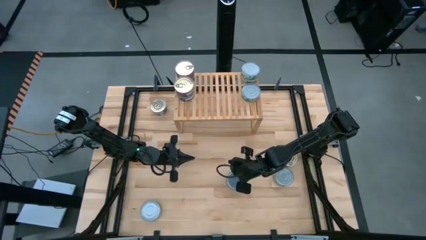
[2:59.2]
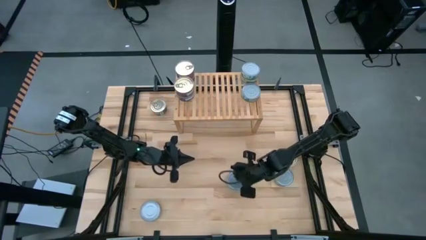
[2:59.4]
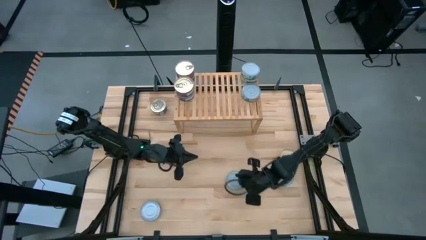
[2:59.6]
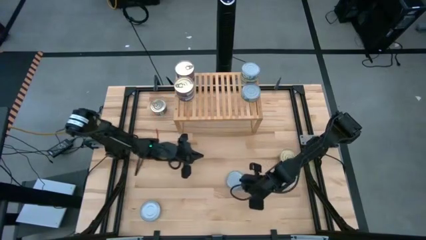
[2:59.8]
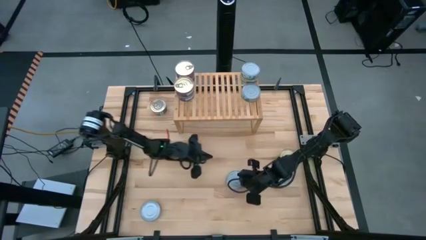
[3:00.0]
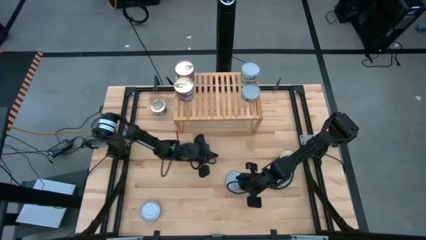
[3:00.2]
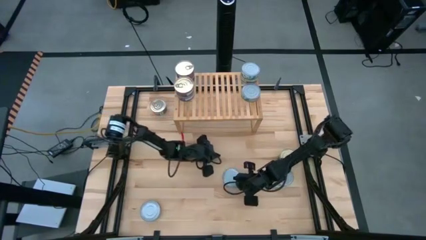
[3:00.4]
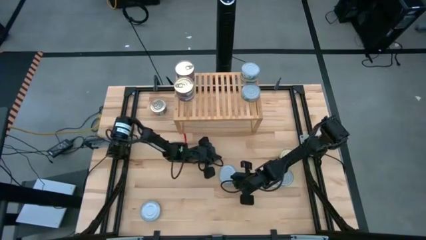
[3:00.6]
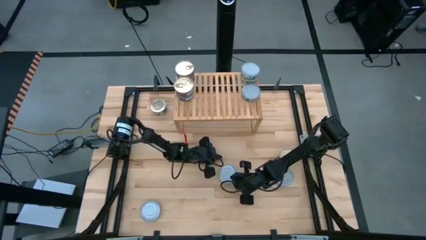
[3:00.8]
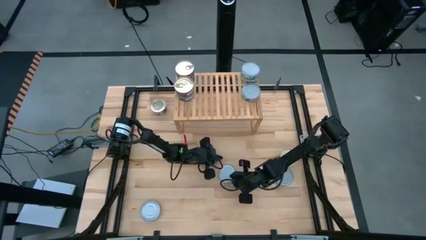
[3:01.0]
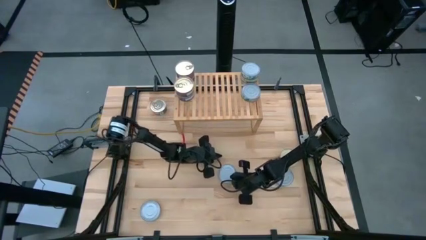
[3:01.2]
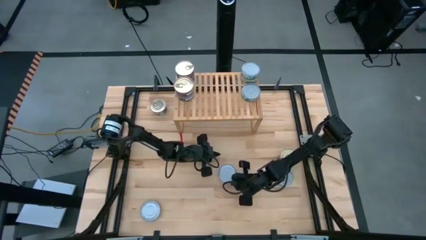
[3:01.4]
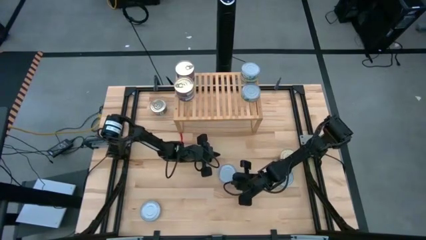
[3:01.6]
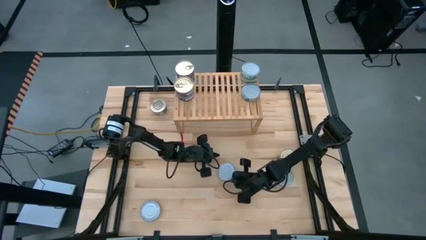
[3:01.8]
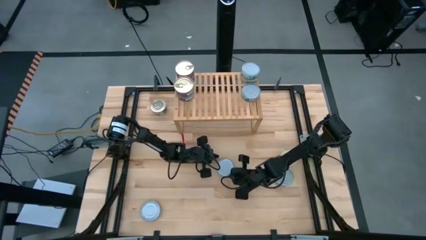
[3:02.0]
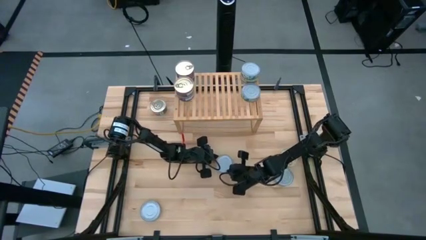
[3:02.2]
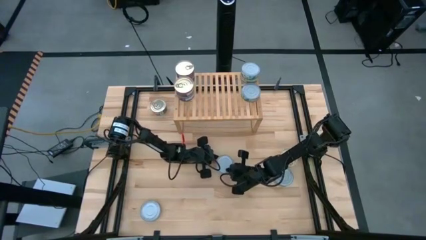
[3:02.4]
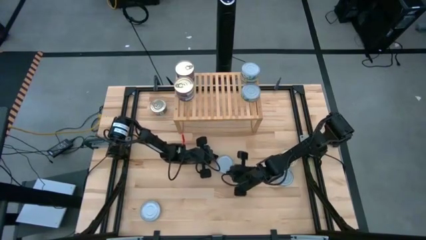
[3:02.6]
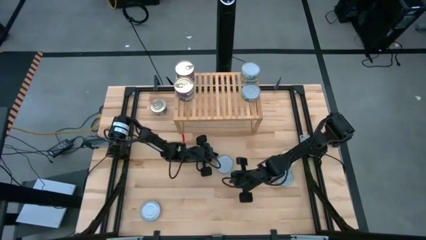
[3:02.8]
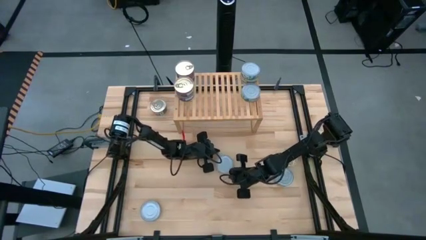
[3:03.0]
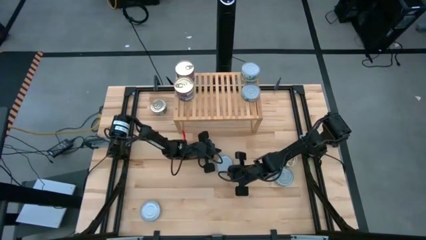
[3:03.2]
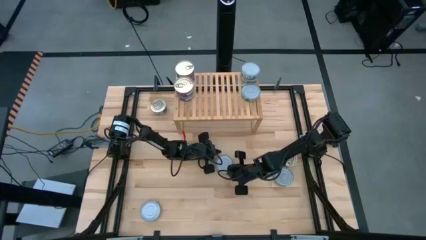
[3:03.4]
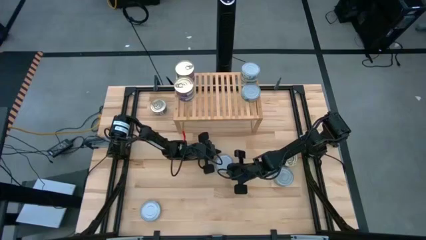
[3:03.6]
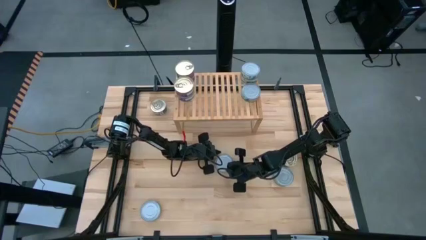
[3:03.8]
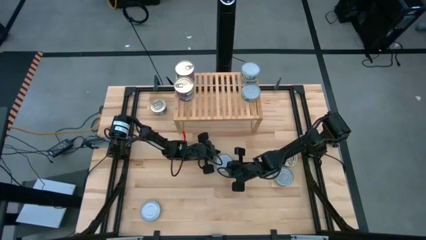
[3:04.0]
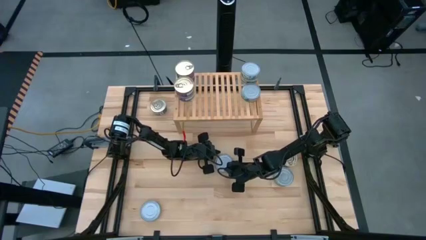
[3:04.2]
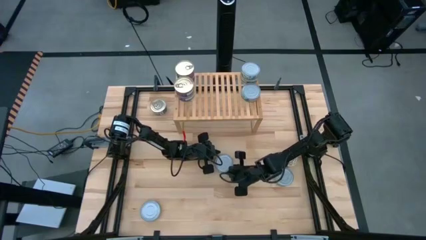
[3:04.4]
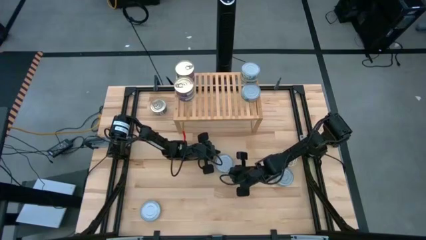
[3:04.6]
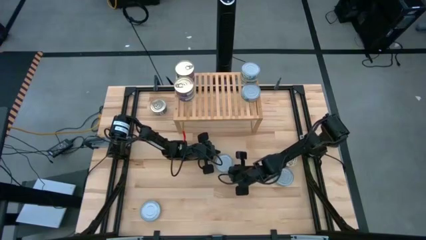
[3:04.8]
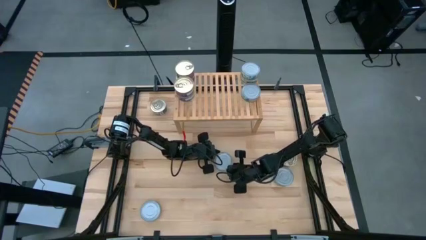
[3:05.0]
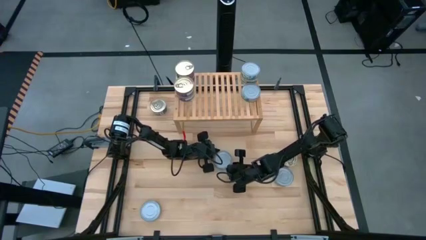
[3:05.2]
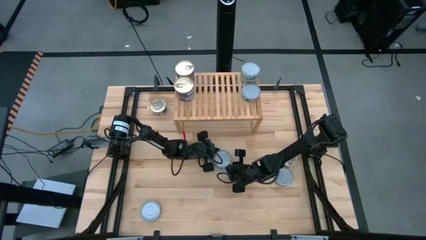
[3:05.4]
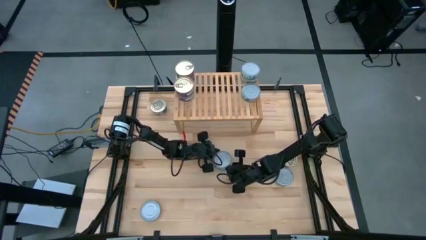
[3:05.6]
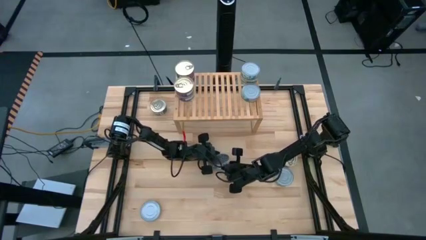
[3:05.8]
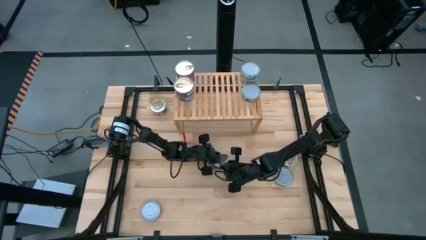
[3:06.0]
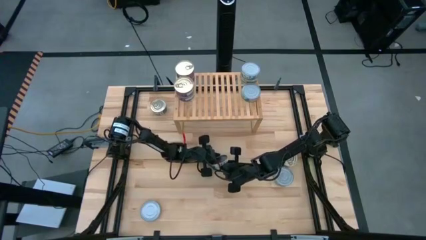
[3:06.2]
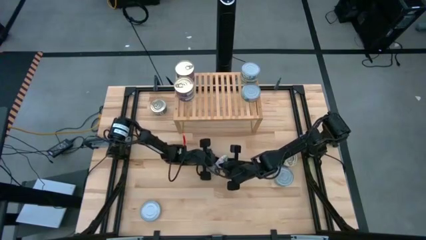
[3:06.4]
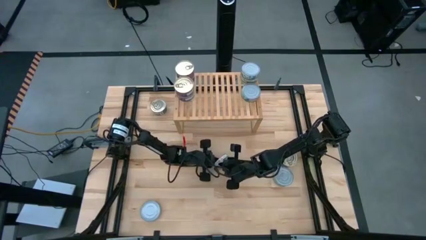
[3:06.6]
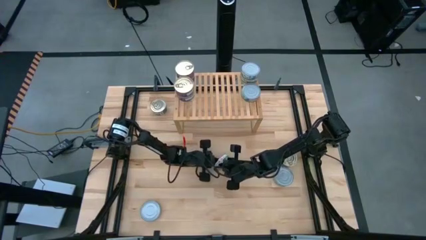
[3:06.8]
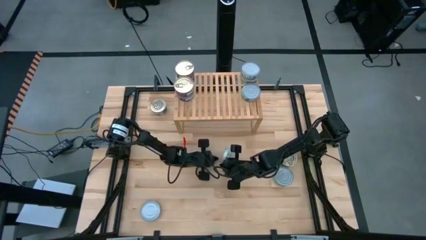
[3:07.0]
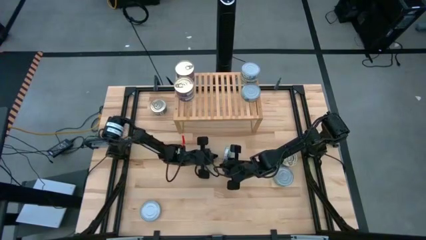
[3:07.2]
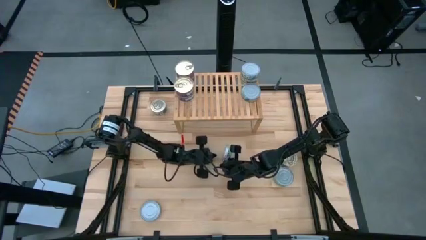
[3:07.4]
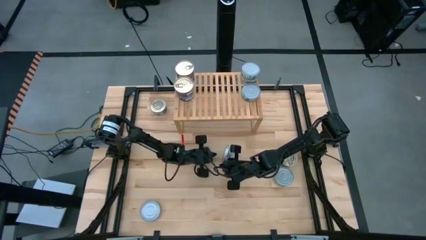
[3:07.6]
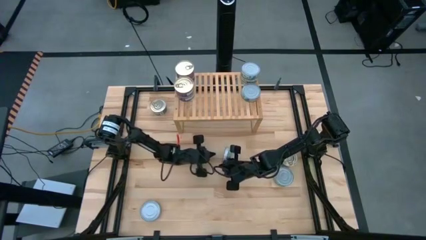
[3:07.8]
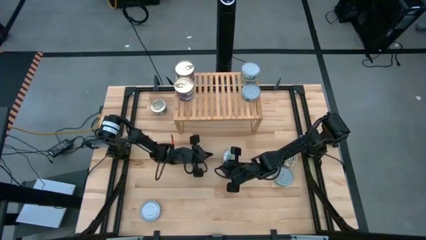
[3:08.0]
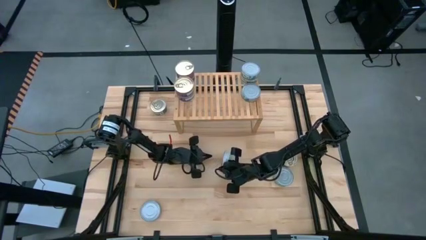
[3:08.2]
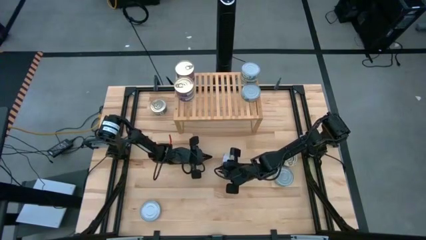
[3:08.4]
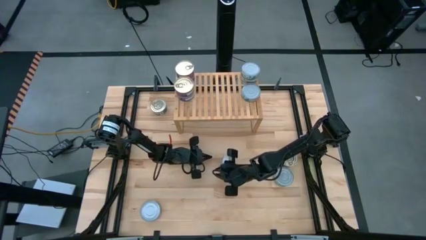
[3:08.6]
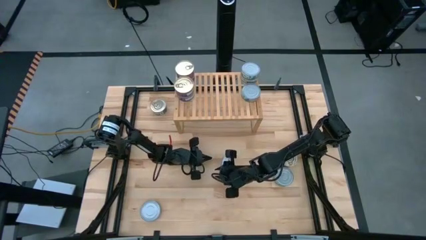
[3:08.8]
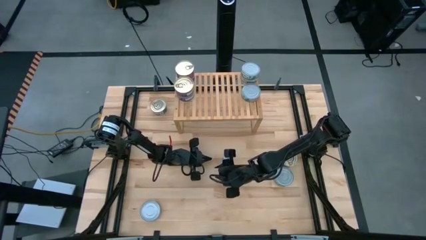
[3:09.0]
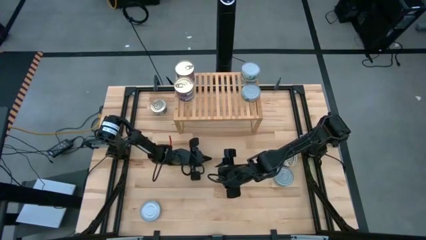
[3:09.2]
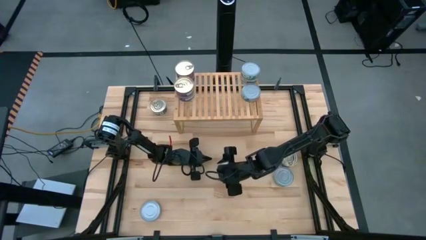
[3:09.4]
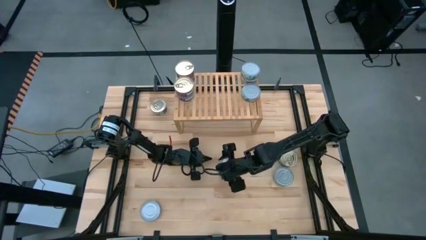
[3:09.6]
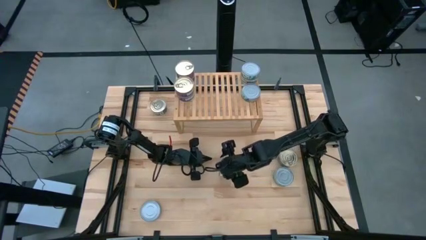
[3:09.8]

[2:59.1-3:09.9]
Task: Stack canned seafood by type on shelf
Stack the green tuna can on top of the other green tuna can on the shelf

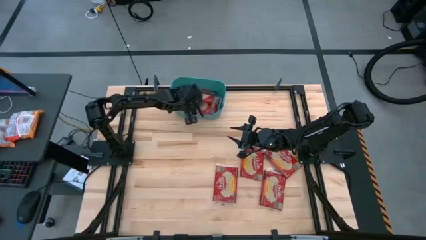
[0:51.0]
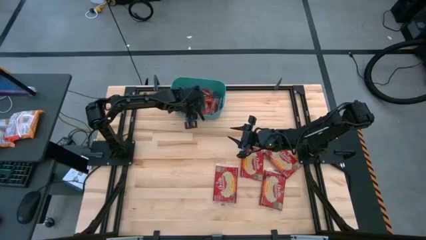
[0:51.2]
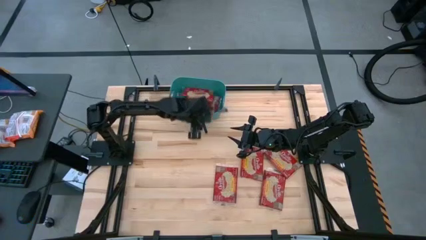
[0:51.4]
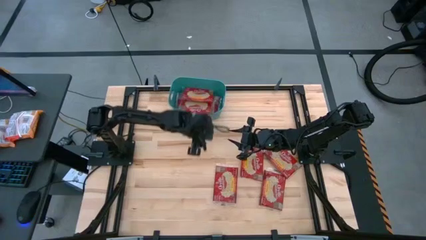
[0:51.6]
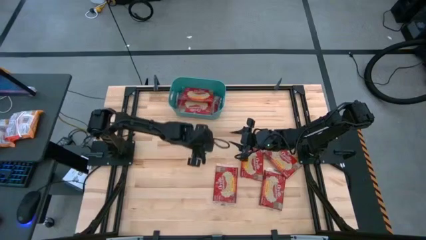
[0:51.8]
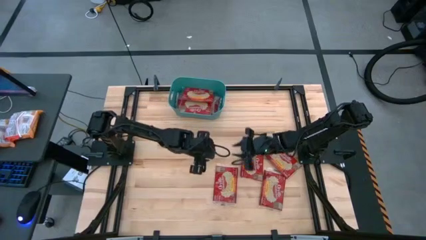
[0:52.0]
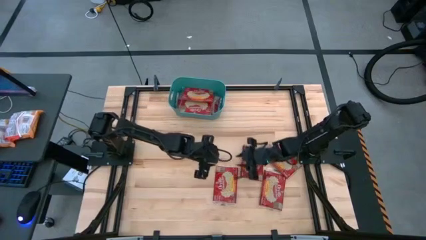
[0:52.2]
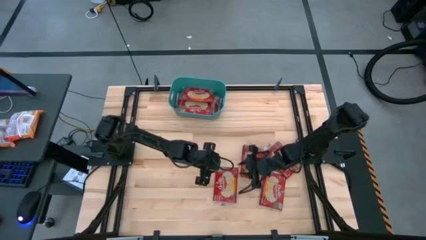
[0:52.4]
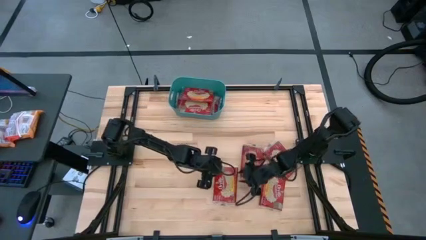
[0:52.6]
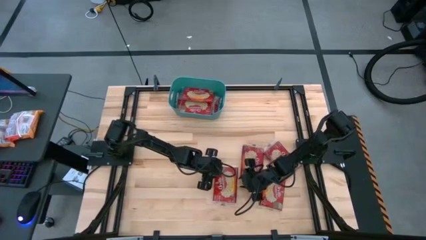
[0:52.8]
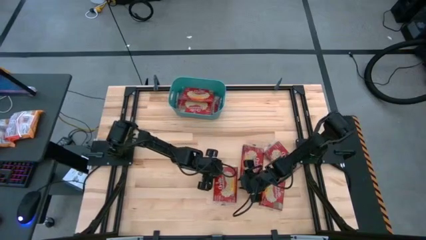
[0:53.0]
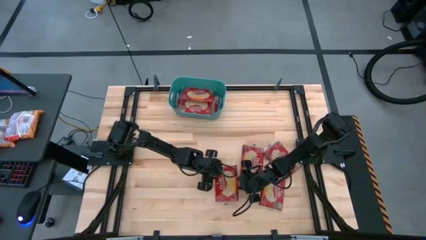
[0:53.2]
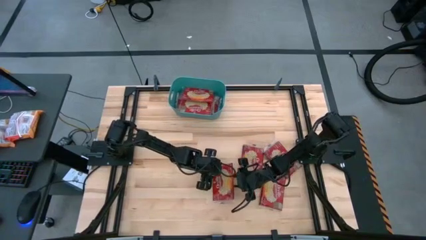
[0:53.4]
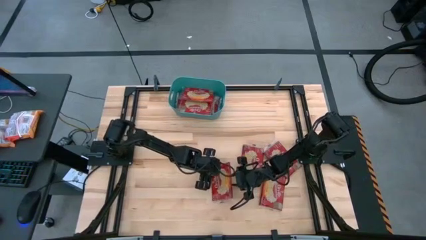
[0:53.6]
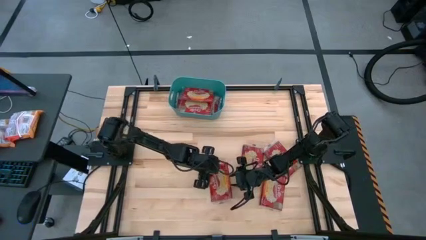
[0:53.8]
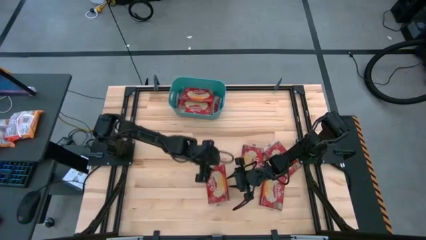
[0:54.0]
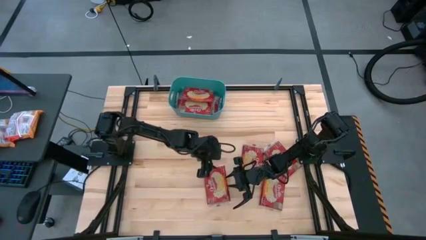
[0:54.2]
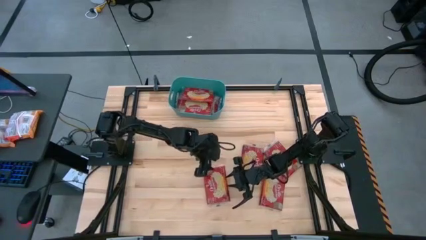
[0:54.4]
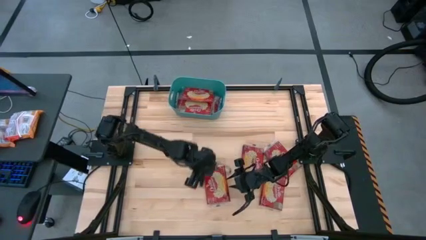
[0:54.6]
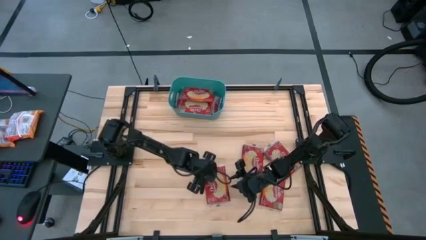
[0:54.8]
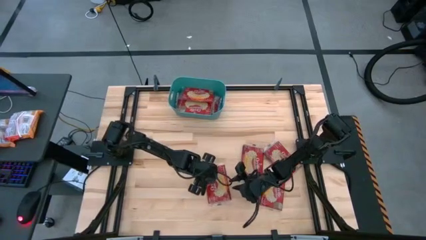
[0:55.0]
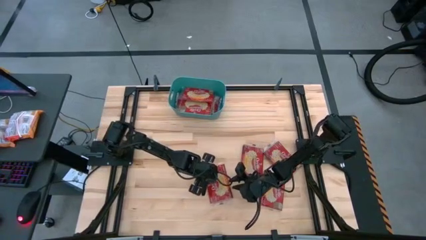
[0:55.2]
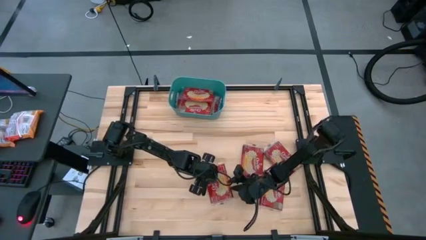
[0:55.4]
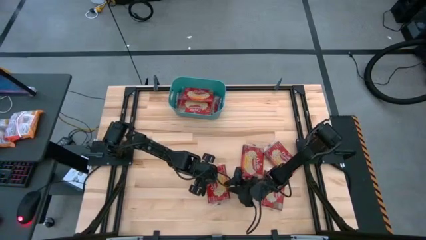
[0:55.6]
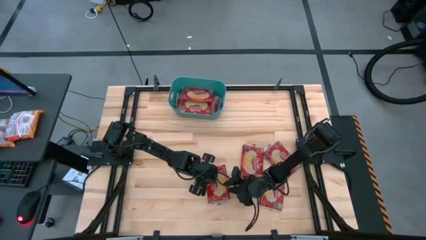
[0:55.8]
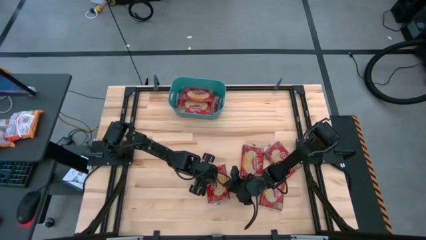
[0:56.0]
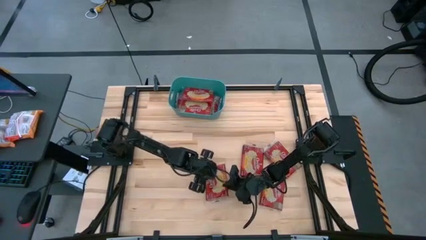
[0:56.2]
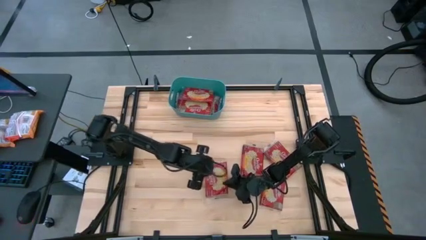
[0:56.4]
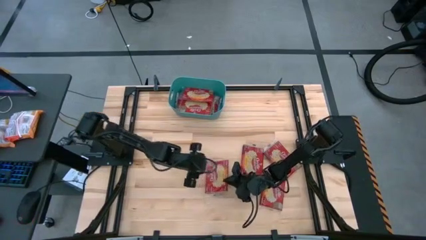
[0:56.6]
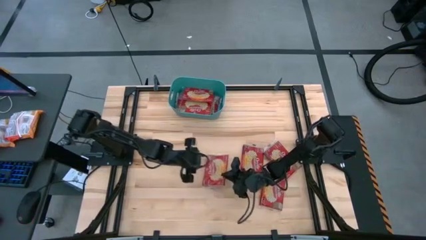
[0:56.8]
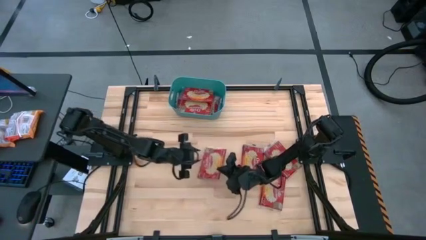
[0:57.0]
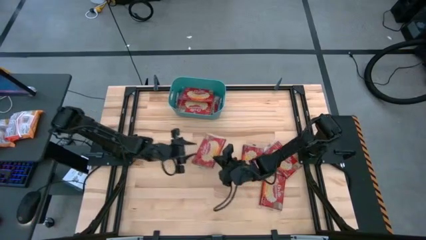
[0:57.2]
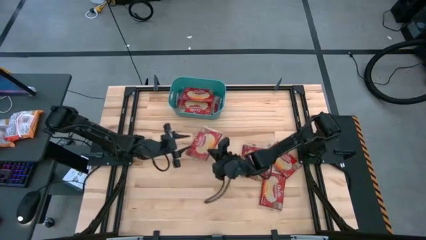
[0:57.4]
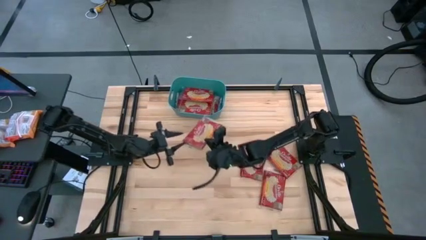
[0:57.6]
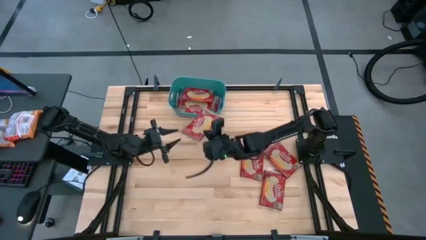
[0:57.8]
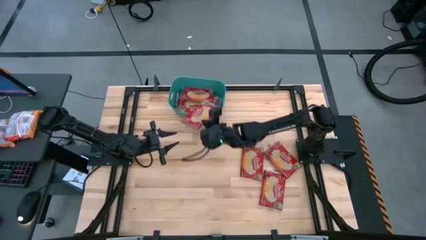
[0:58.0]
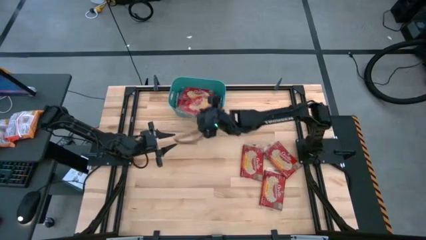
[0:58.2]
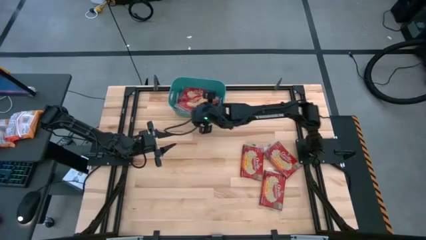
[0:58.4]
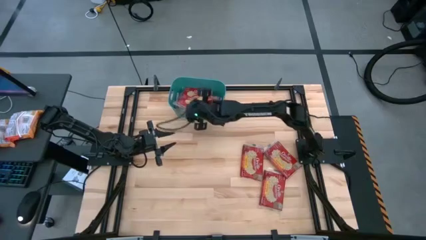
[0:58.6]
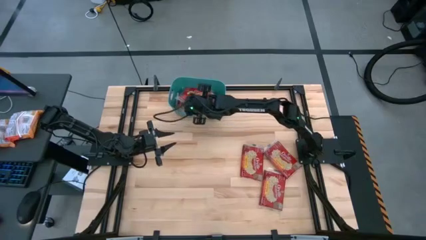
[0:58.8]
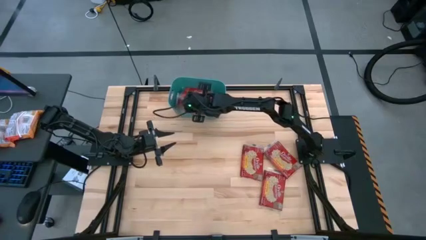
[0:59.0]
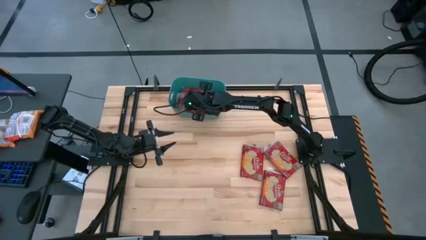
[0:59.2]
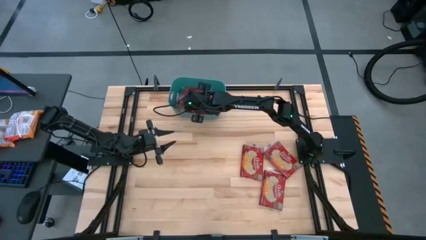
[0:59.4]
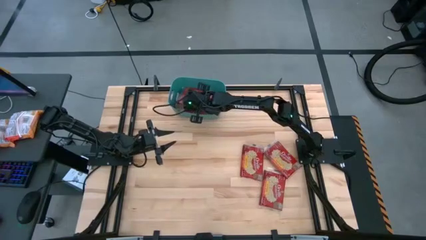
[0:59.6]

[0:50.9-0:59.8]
Task: Sort popcorn bags into baskets
Put the red popcorn bag into the green bin
